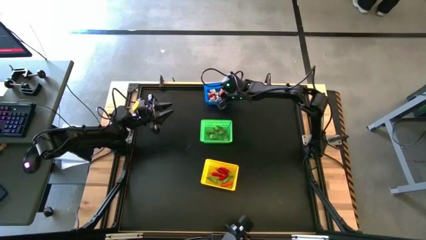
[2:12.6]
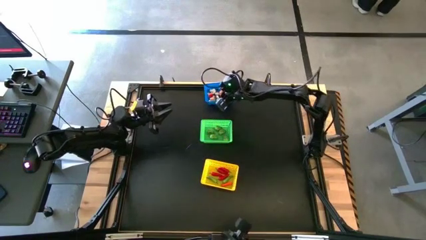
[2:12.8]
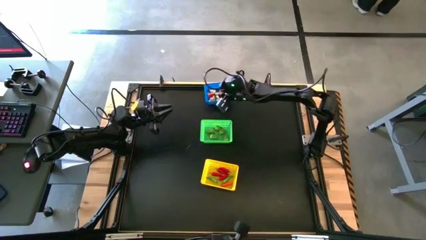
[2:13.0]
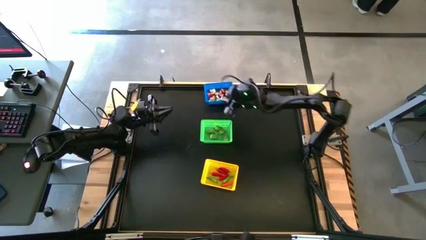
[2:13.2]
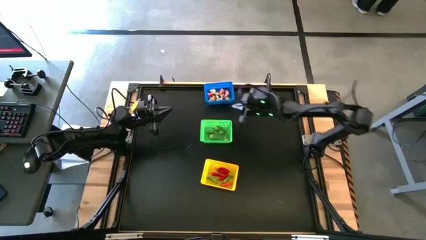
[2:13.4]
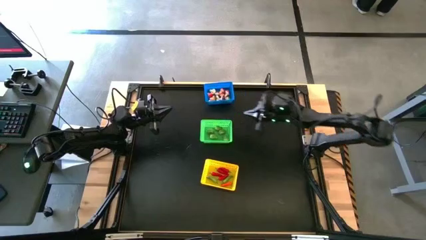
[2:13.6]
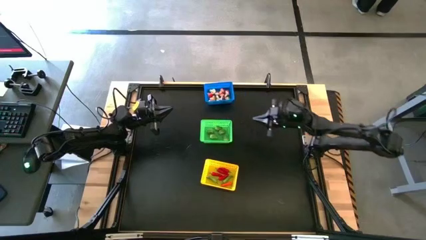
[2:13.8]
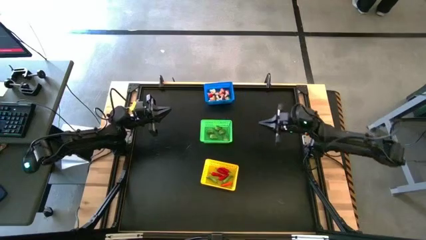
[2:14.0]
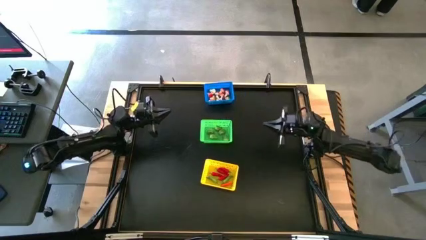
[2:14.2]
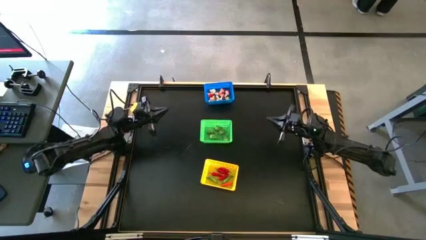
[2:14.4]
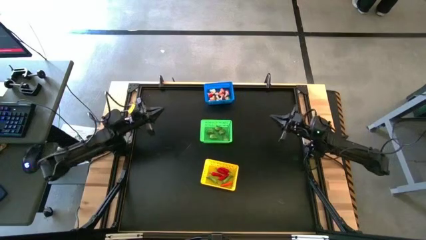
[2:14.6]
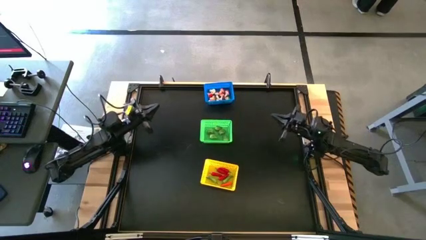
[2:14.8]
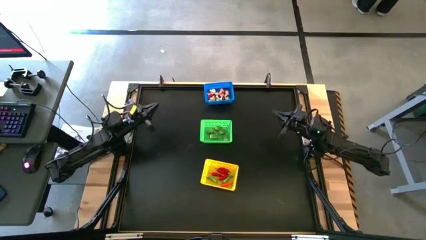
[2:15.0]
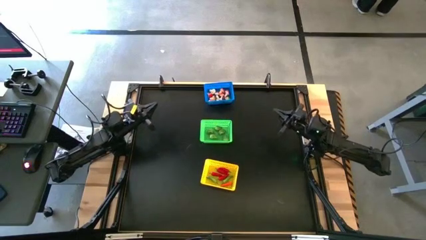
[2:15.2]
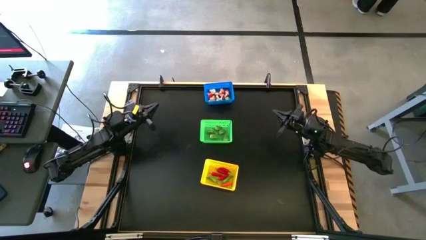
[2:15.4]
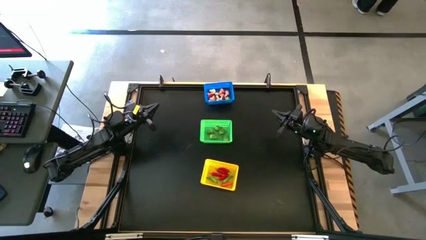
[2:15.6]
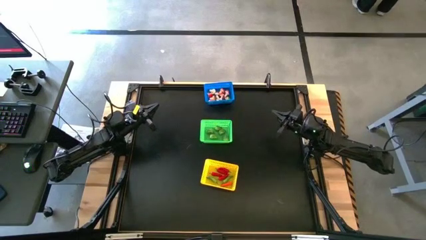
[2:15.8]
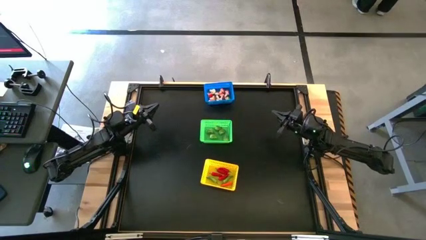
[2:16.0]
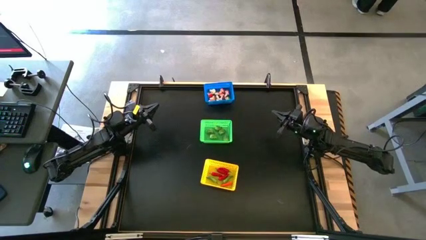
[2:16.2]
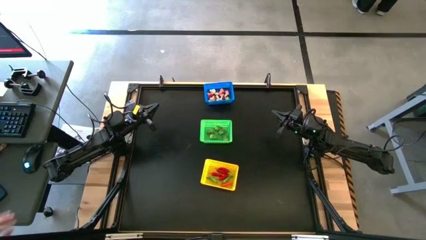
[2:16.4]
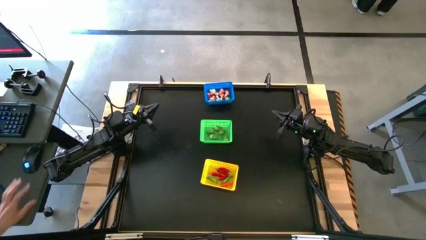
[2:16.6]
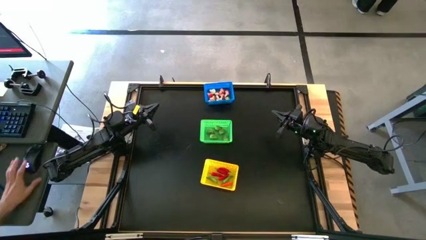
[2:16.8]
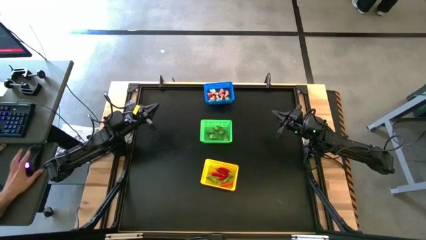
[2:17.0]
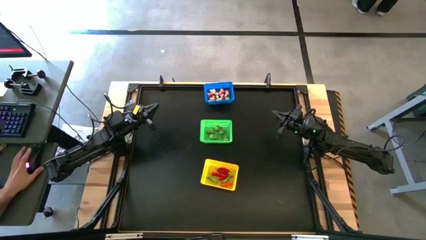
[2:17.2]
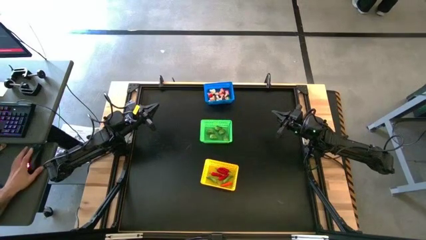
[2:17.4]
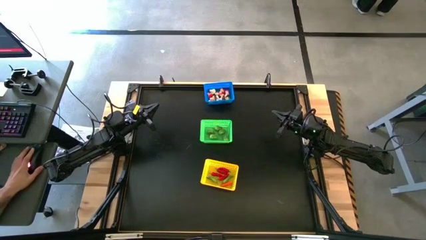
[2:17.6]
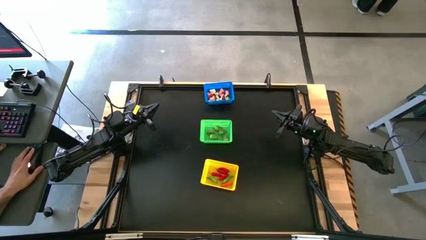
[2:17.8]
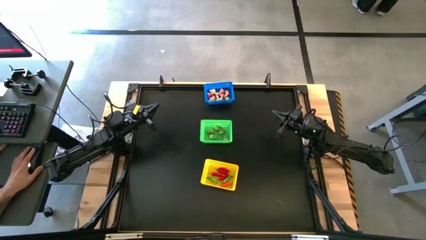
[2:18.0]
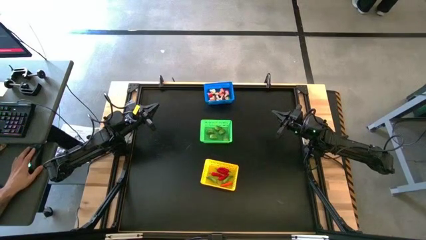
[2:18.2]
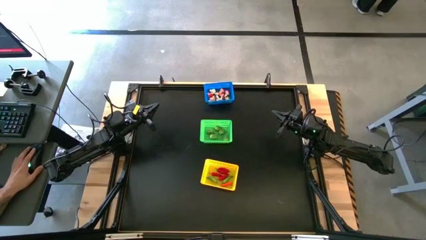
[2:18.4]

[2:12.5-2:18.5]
Task: Sort produce into baskets
Return to Home Position

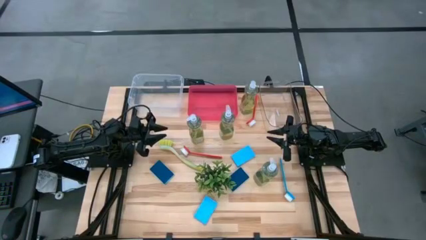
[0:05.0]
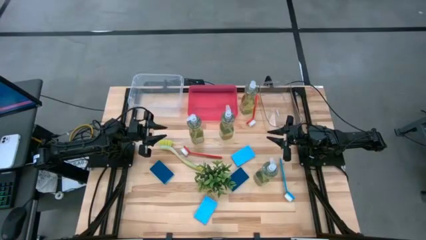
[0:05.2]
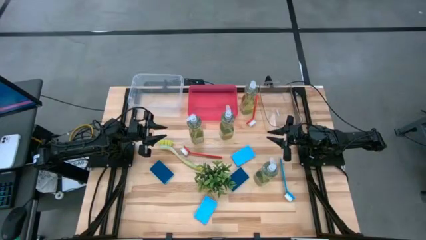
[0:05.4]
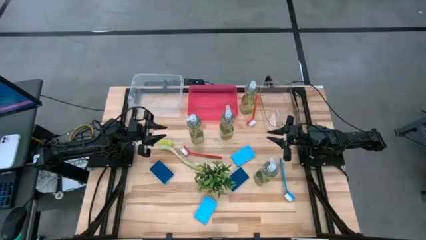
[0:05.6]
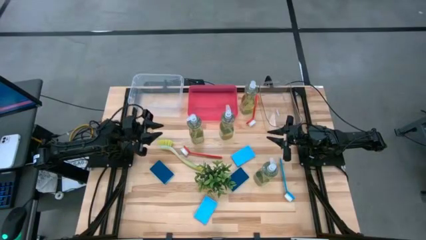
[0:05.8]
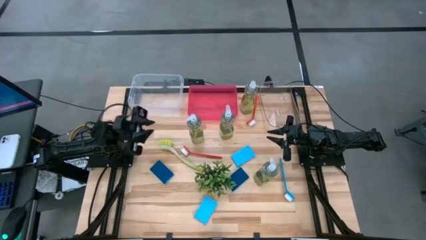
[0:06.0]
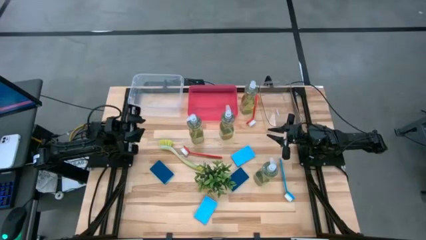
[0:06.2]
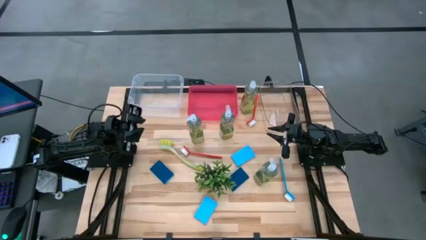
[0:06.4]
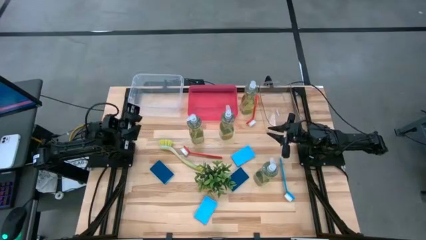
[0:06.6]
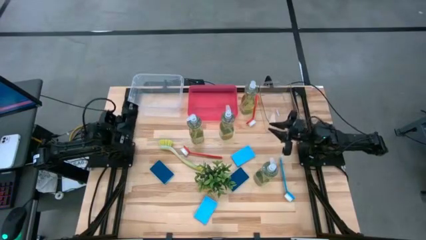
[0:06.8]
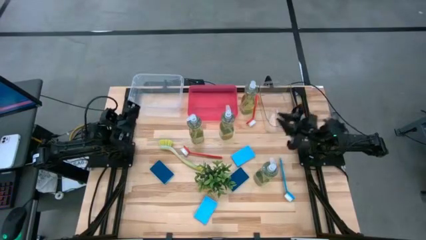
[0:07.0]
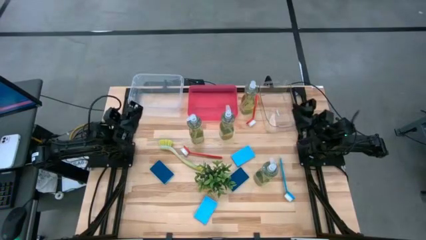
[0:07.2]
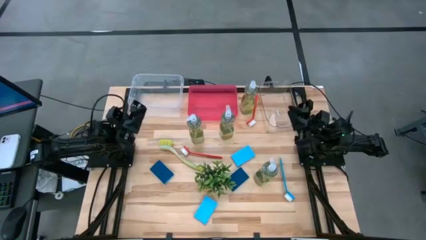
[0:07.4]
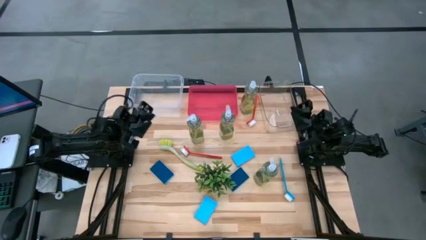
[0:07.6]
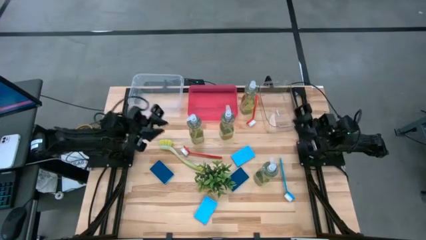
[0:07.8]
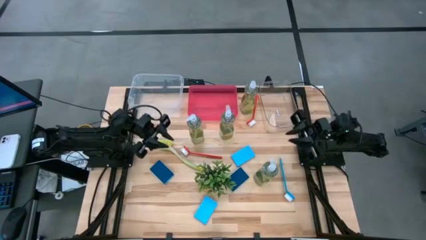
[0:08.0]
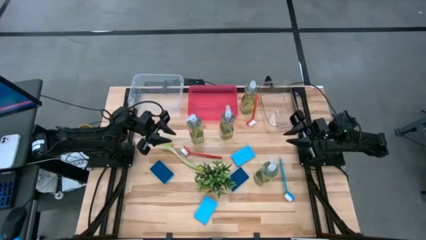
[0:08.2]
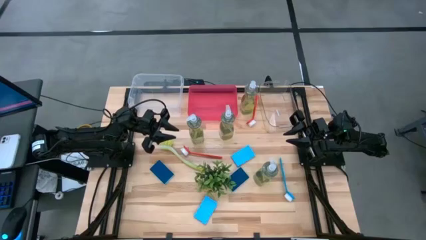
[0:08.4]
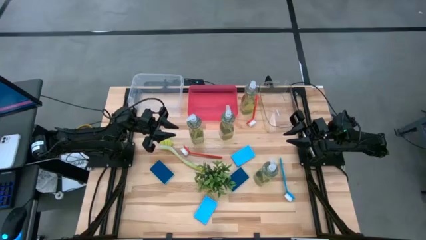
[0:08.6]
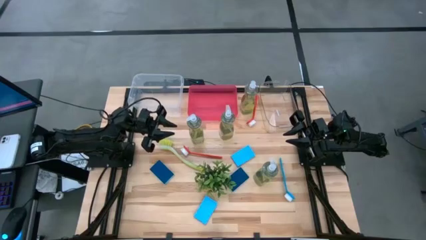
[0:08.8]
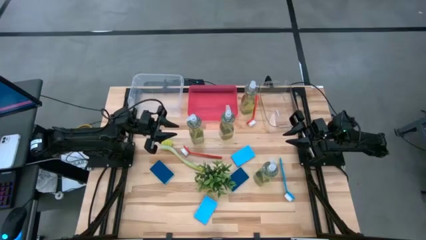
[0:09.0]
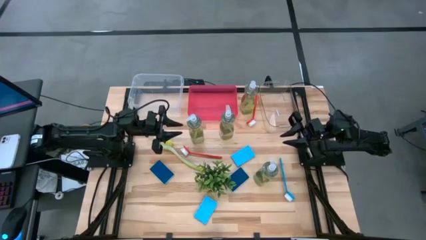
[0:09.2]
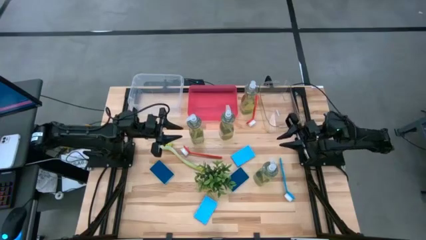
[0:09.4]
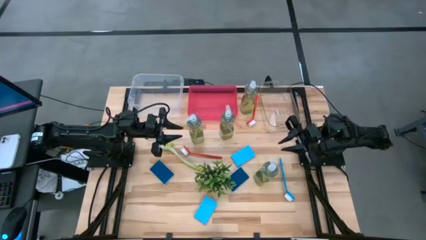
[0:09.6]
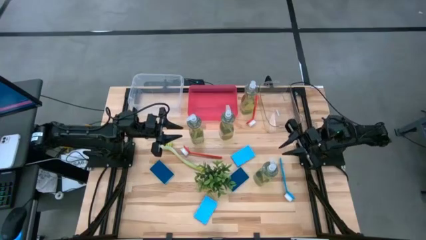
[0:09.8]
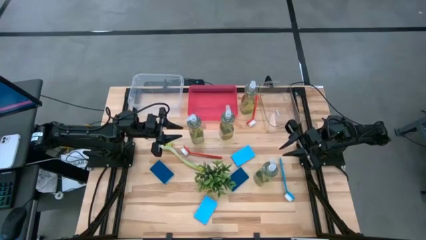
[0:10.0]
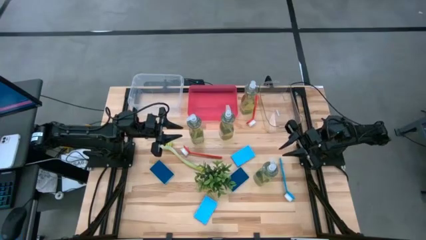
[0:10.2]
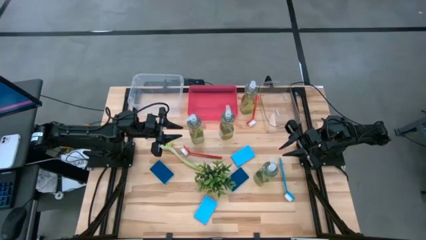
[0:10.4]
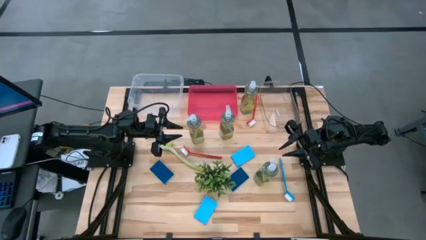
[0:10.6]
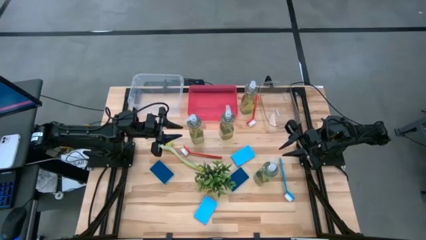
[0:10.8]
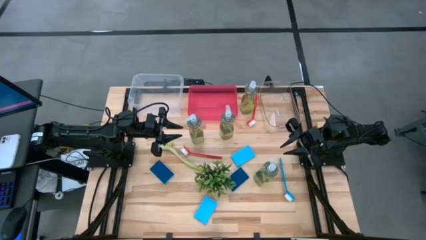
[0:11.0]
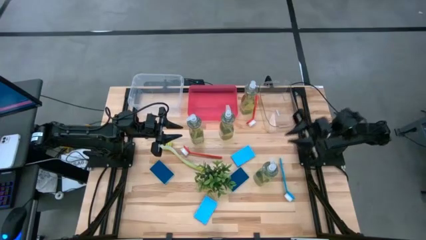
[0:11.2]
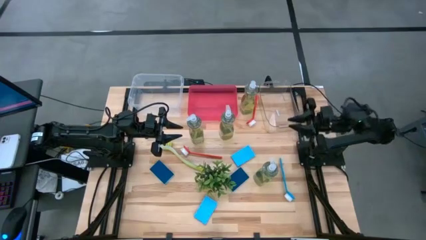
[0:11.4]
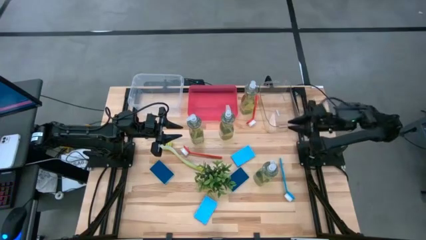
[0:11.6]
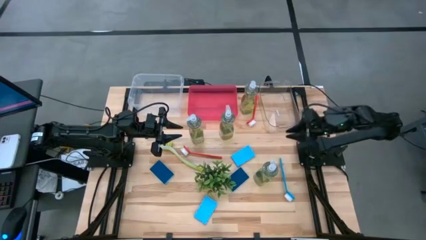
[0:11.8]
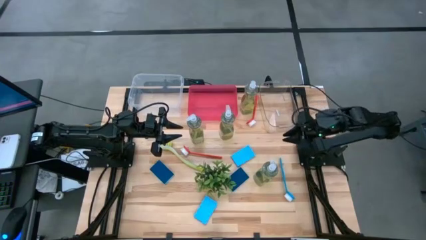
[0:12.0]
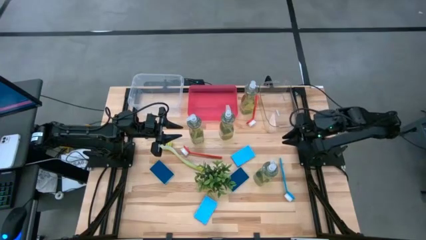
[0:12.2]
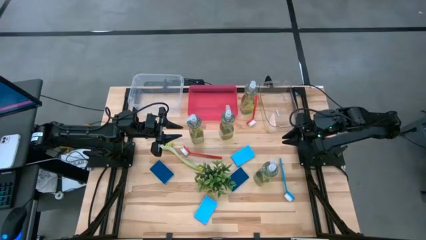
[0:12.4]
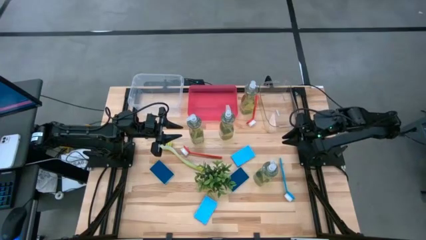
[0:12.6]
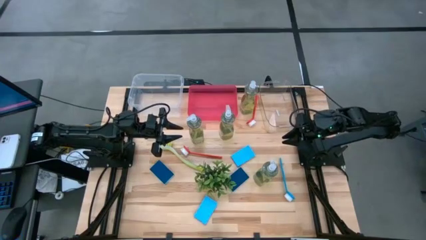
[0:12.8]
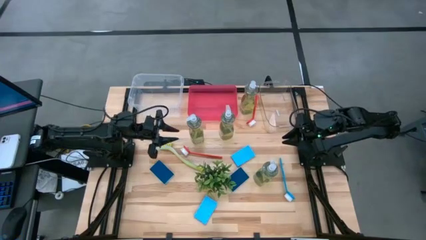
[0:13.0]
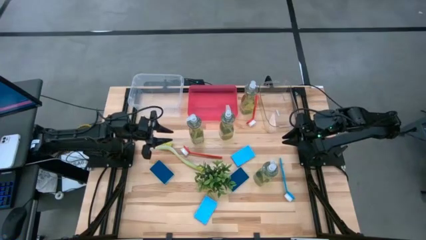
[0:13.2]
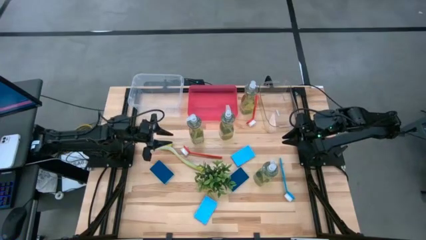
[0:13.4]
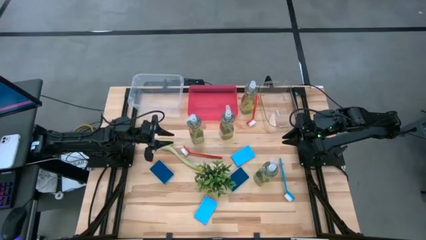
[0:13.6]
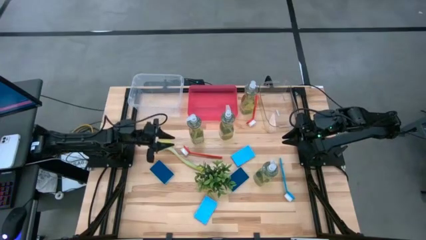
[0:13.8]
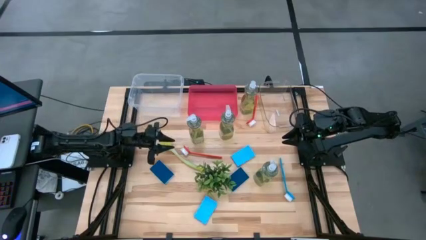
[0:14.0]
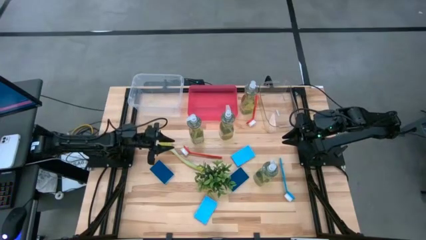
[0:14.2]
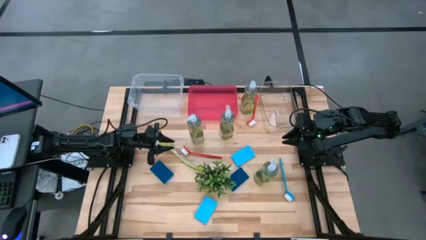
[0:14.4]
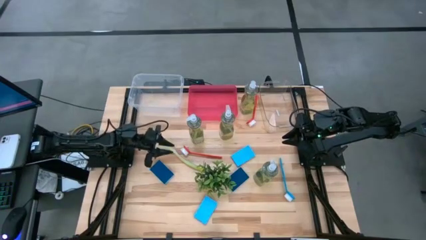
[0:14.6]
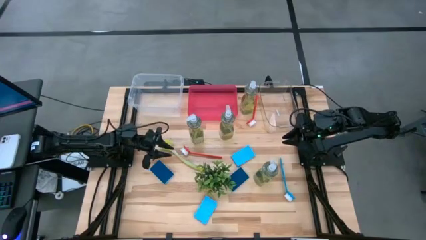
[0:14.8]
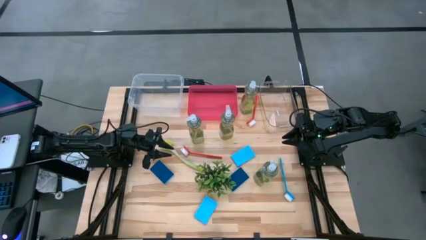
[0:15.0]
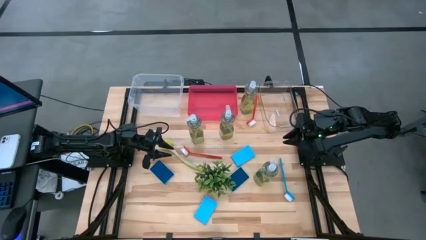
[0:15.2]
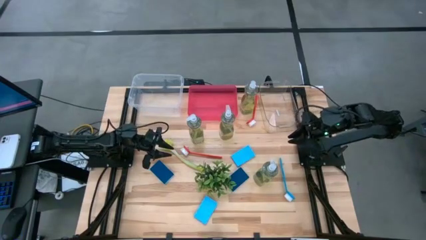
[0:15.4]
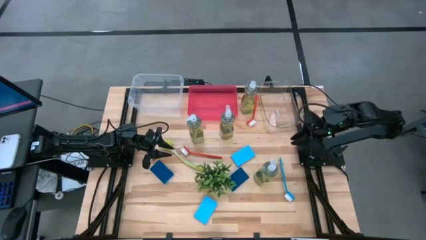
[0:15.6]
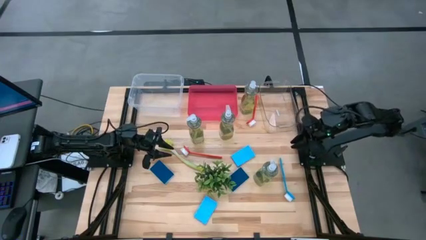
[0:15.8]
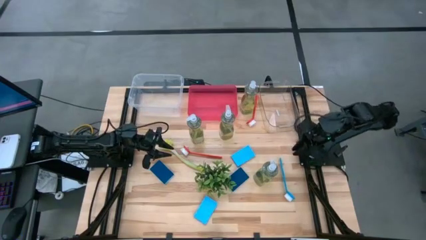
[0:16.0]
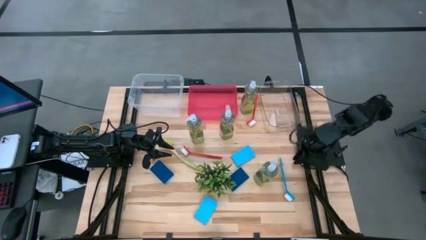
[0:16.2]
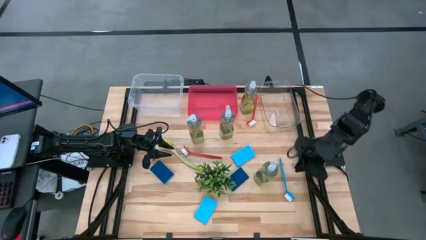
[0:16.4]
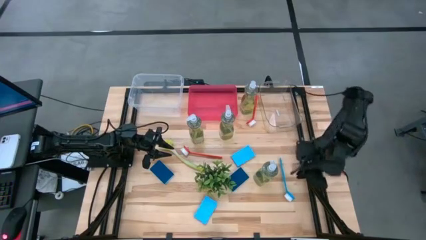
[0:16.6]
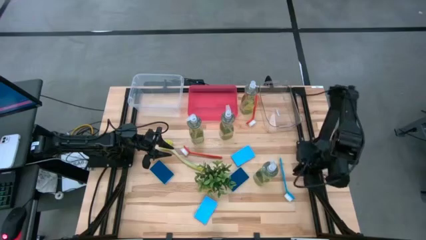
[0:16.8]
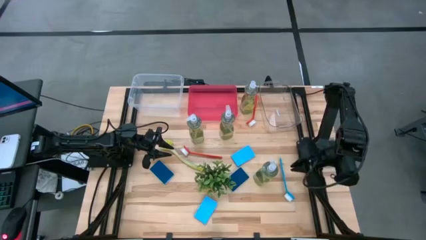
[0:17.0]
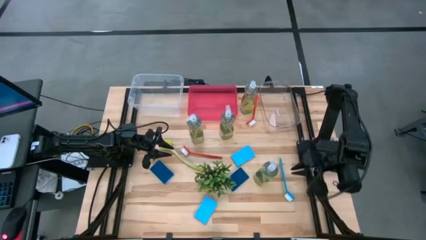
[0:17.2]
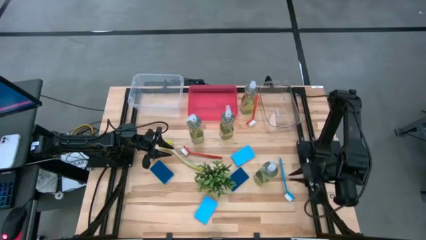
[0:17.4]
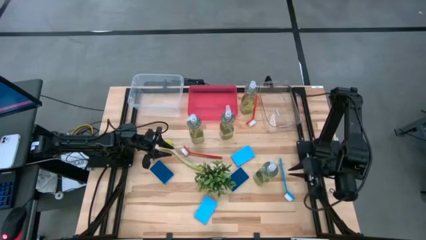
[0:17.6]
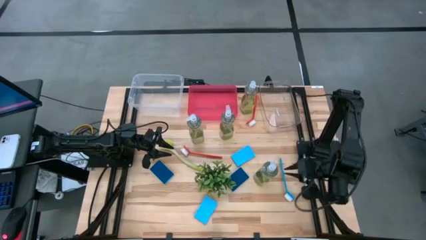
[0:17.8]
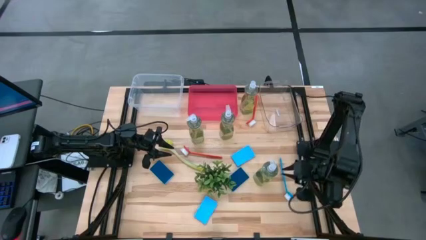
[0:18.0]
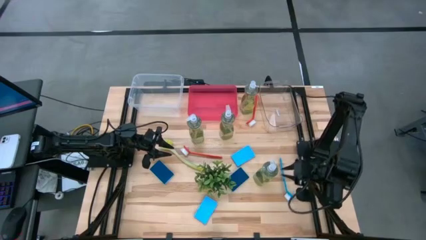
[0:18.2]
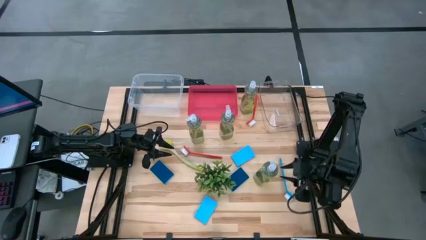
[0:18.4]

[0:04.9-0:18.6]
Task: Pick & Place Kitchen Sink Supplies
Put the yellow dishwashing liquid into the white bin
